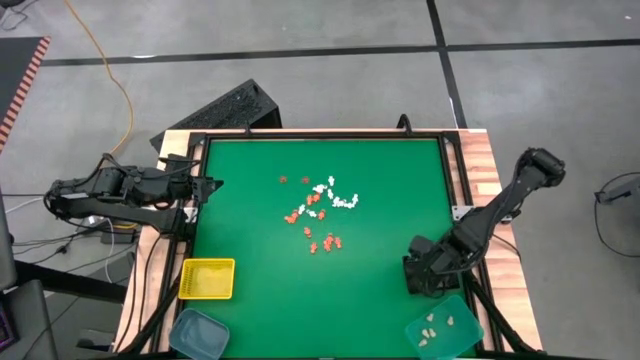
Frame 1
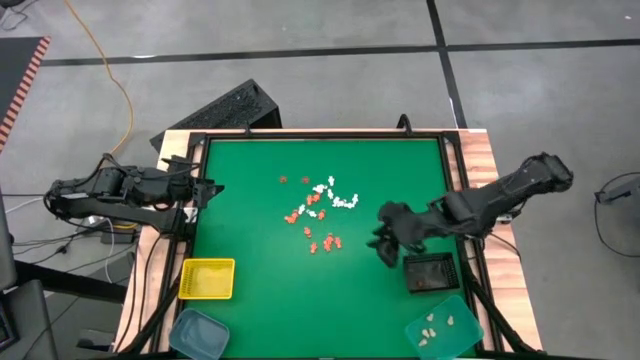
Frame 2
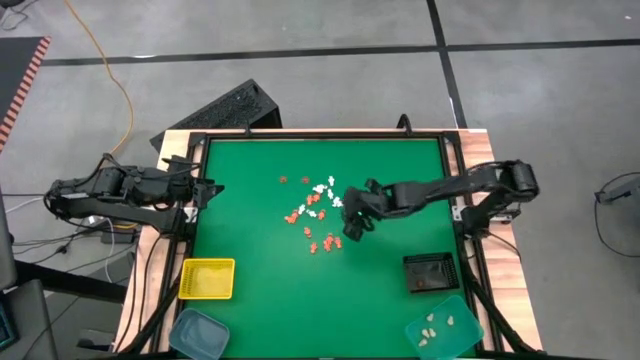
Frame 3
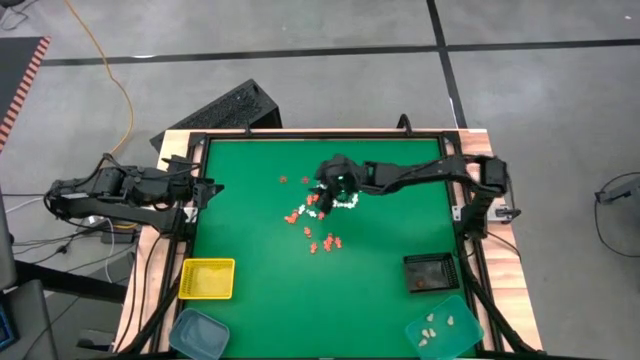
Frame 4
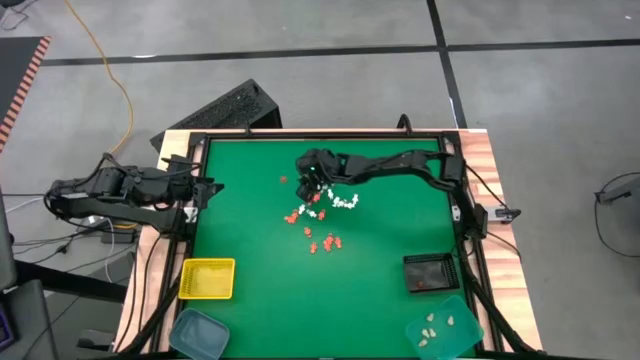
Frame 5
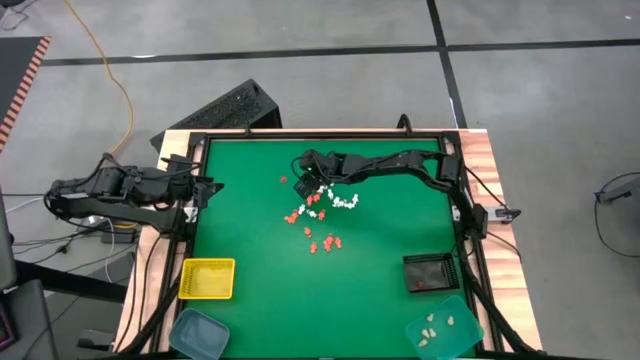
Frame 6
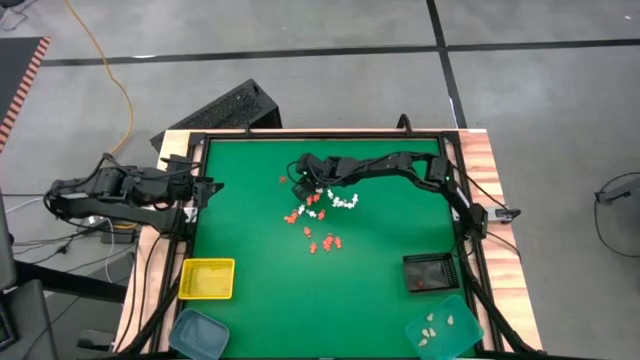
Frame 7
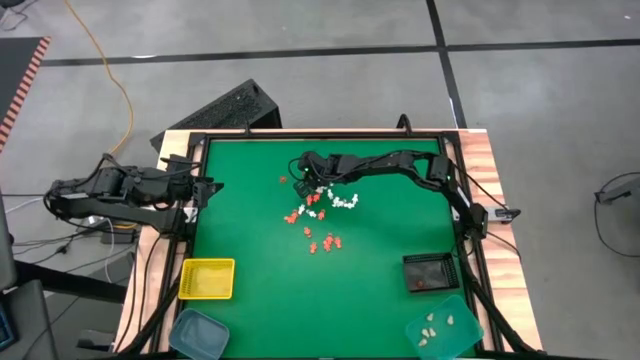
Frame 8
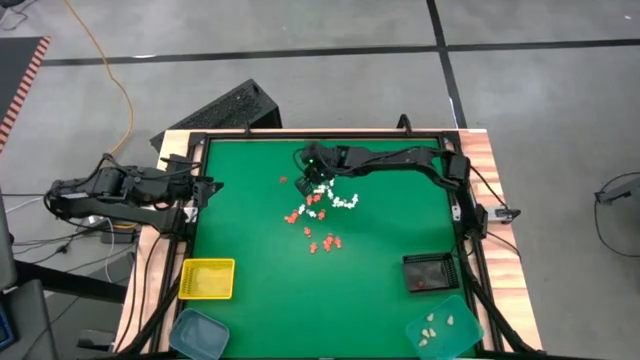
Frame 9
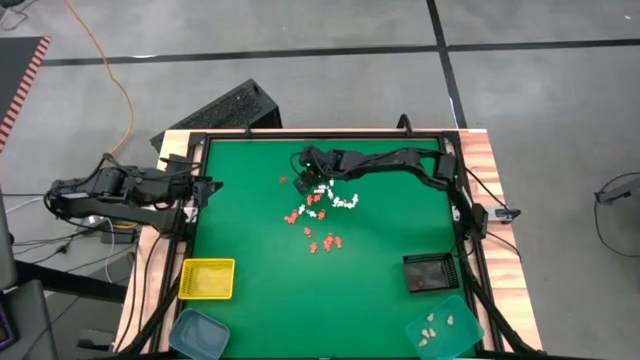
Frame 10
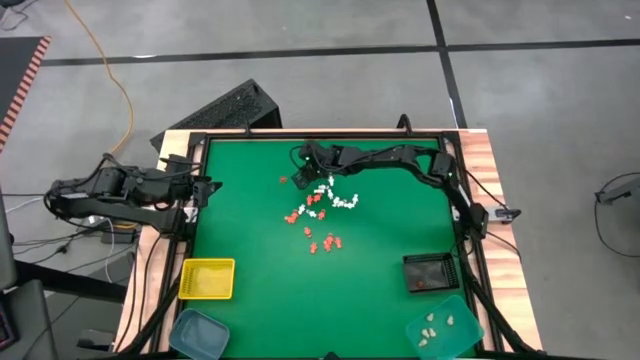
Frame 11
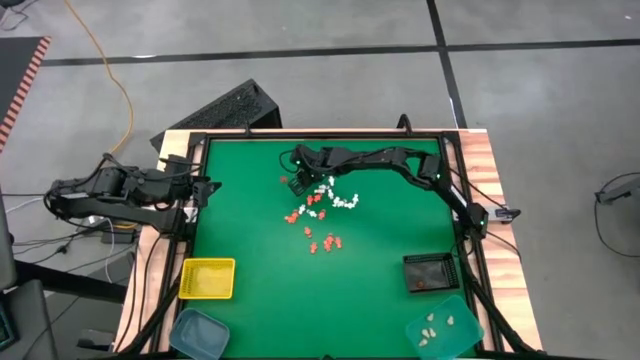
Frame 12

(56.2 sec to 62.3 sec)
Task: Sort Halloween decoration
Put the orange pumpkin toy into the black bin

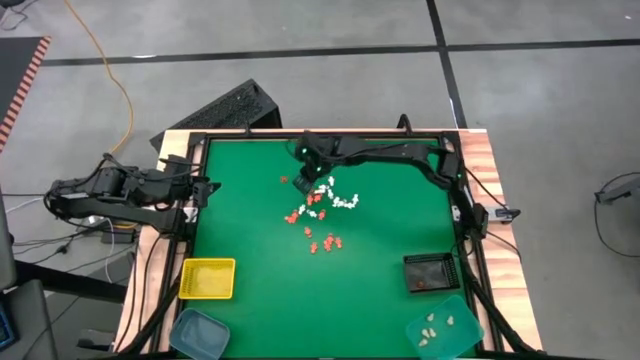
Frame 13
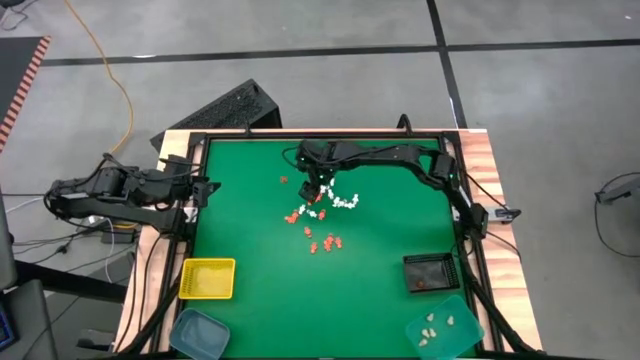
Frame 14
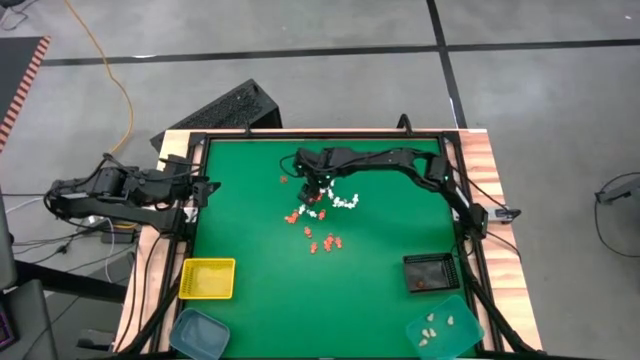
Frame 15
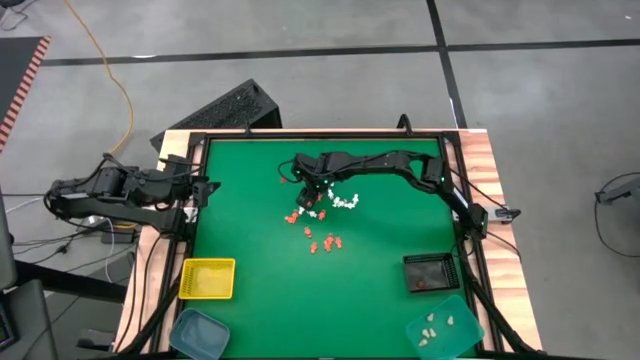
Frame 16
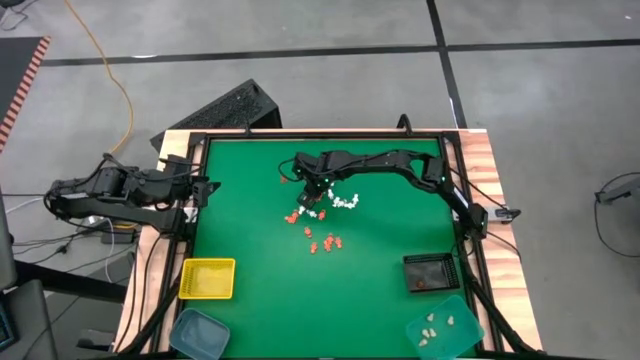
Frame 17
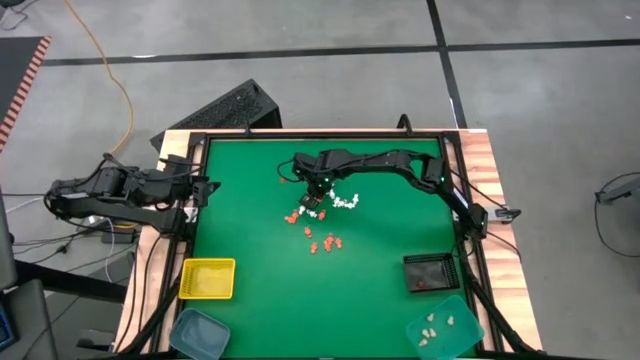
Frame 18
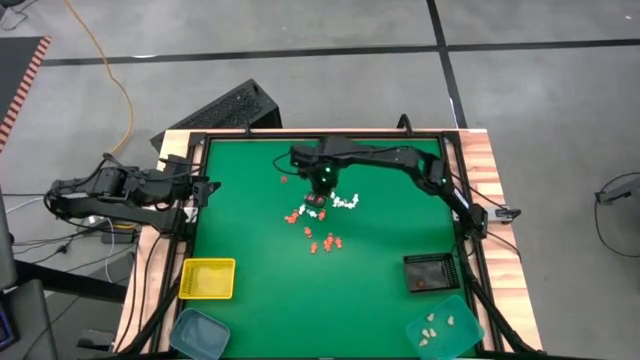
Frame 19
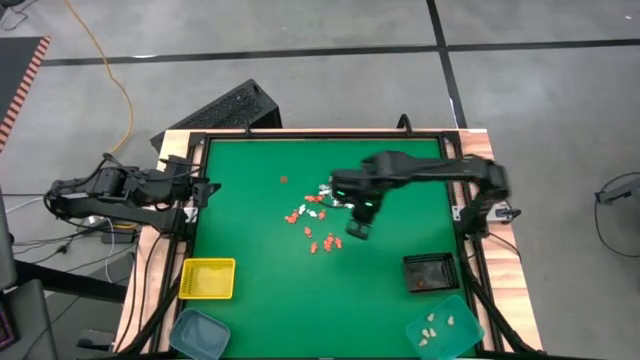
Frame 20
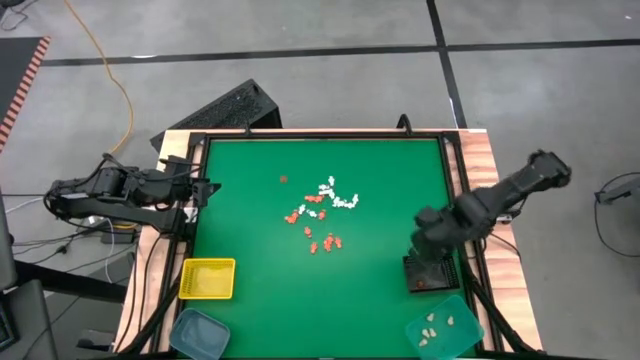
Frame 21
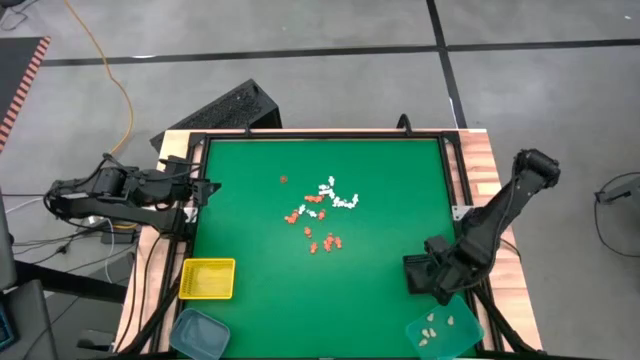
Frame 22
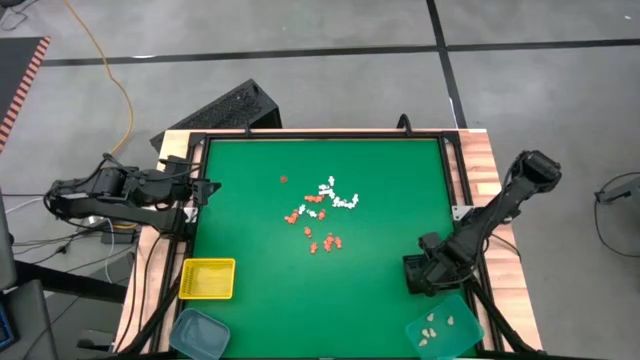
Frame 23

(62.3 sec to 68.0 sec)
Put the orange pumpkin toy into the black bin

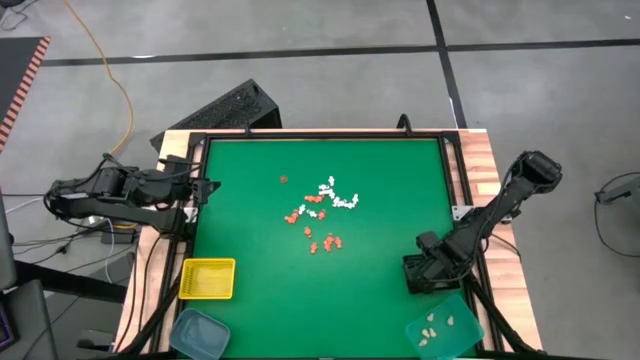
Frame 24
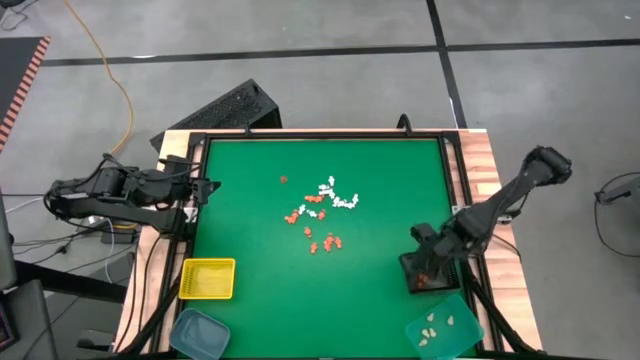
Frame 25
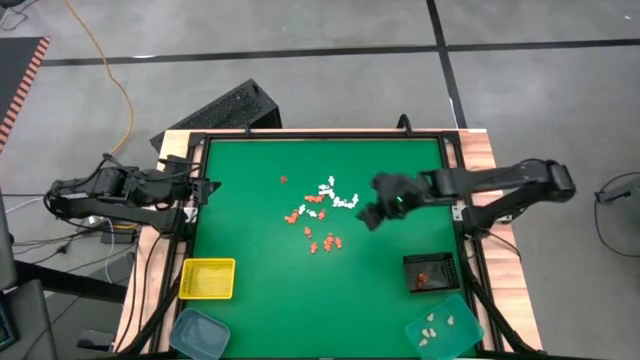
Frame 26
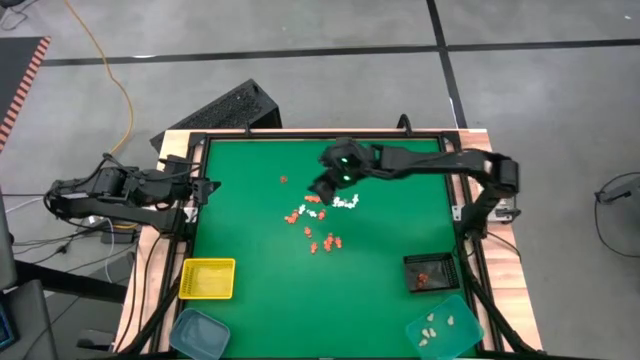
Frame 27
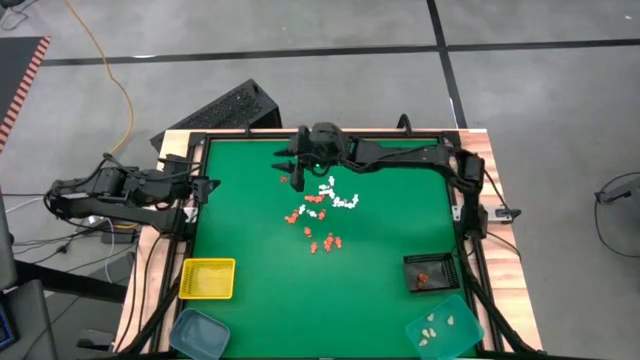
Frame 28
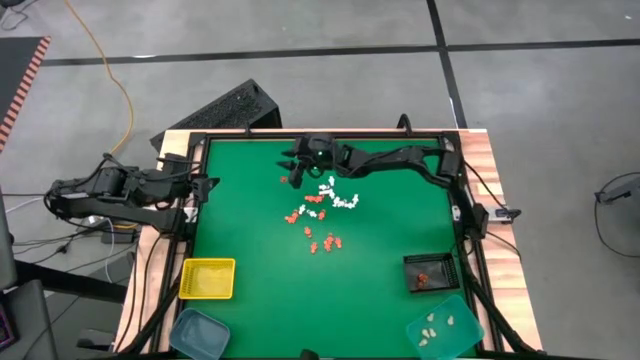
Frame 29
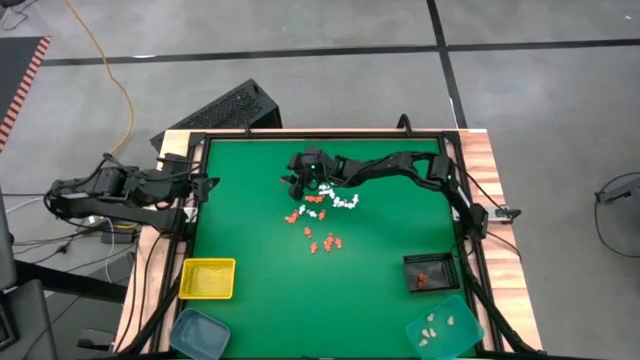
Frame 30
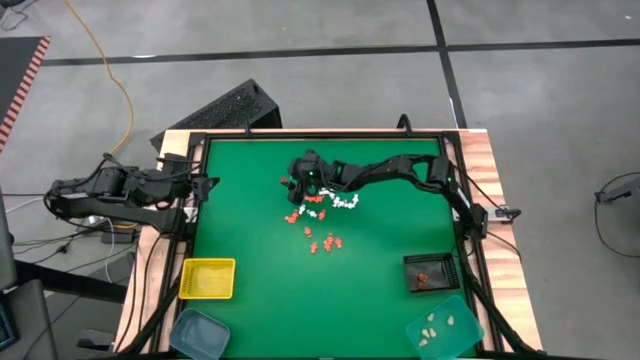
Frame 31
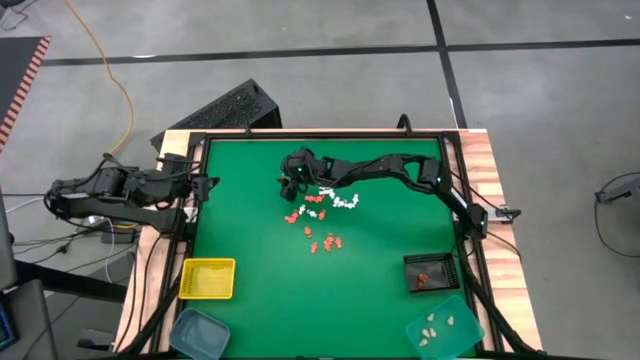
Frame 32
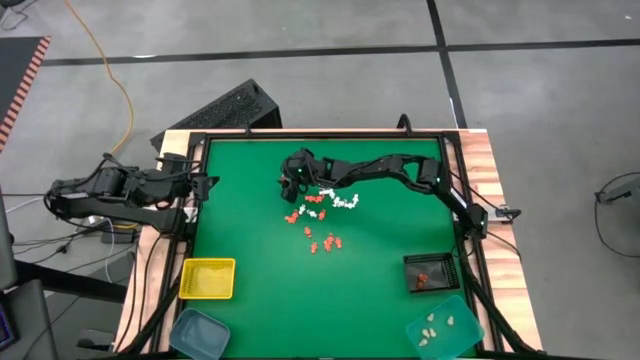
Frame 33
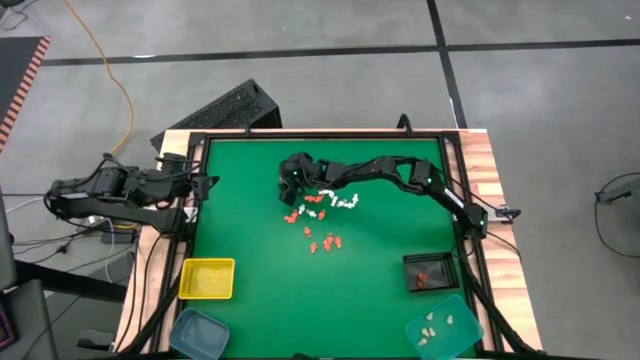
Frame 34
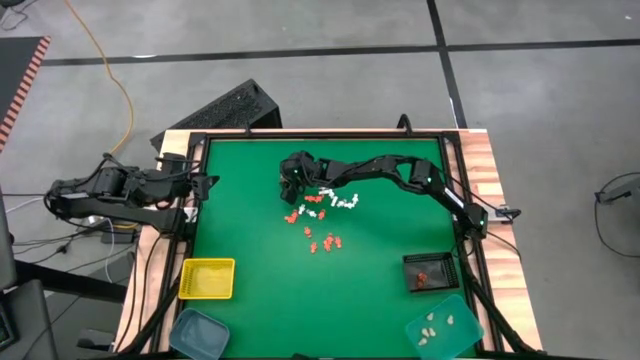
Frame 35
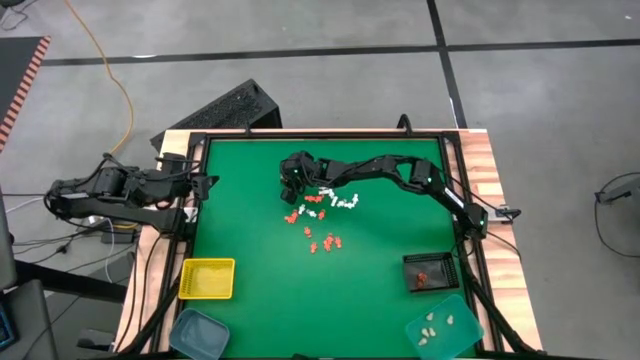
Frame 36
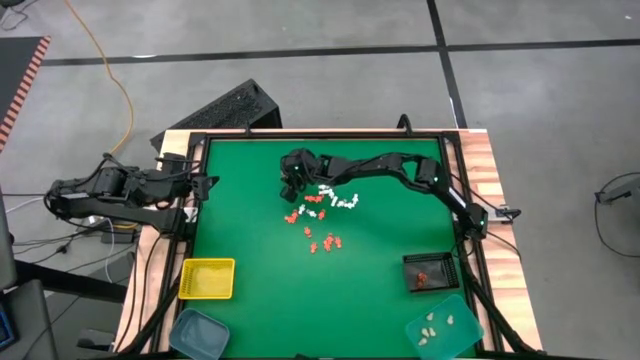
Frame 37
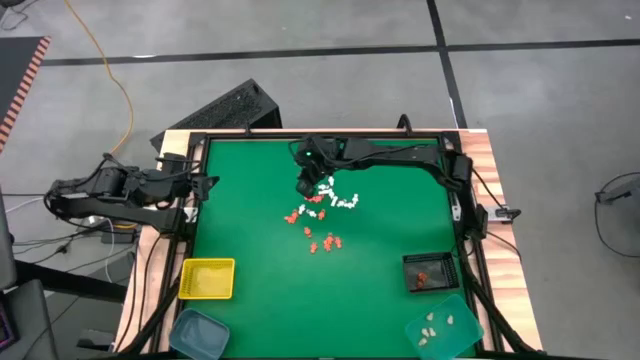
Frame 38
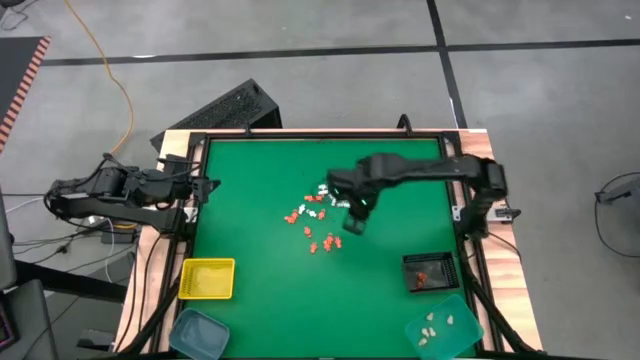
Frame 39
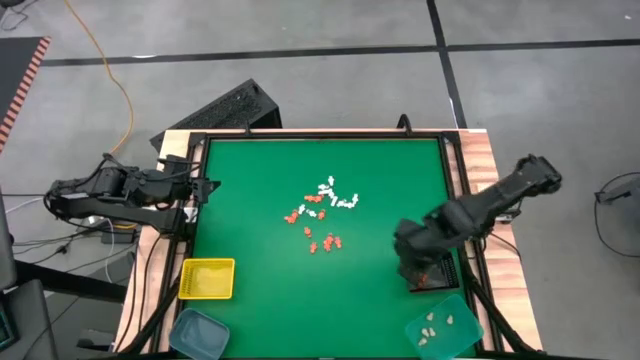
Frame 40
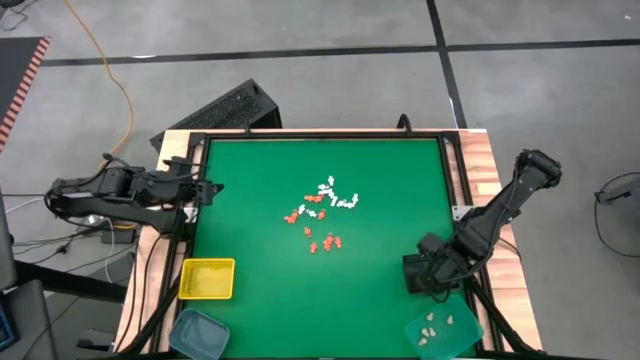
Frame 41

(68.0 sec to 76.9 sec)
Put the orange pumpkin toy into the black bin

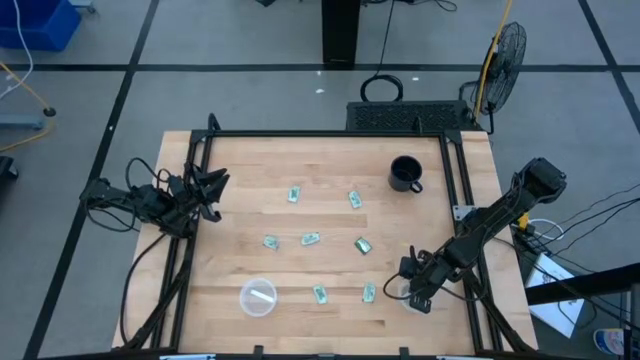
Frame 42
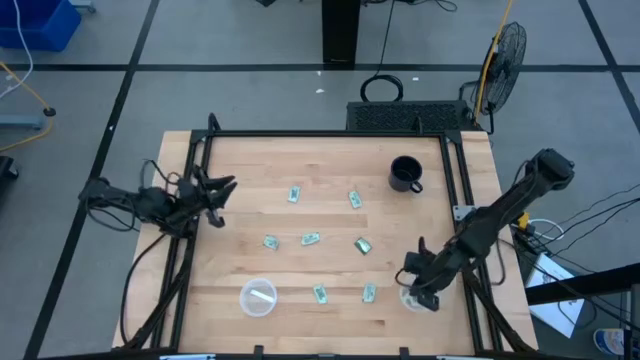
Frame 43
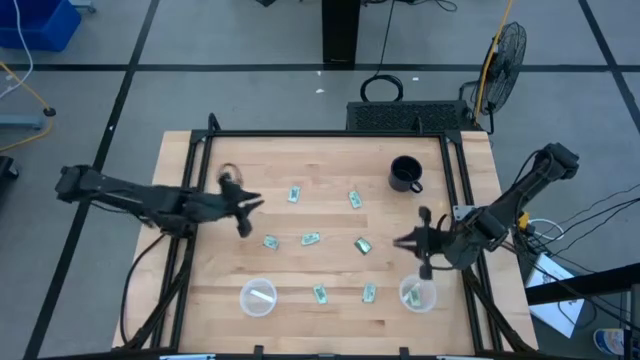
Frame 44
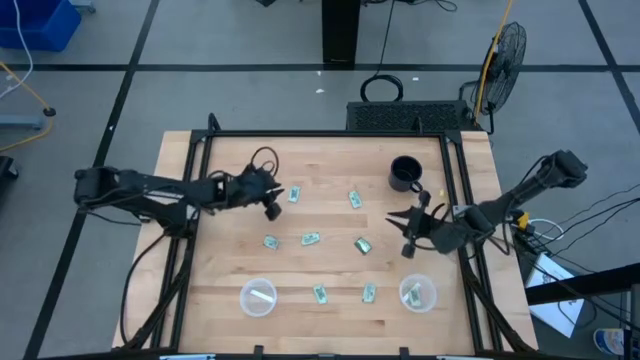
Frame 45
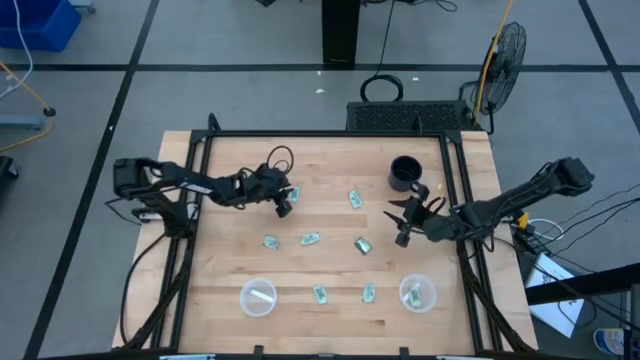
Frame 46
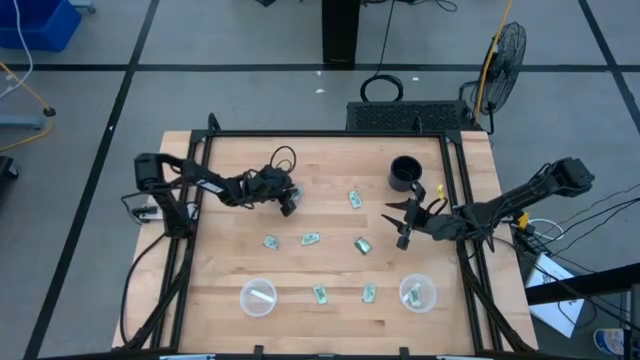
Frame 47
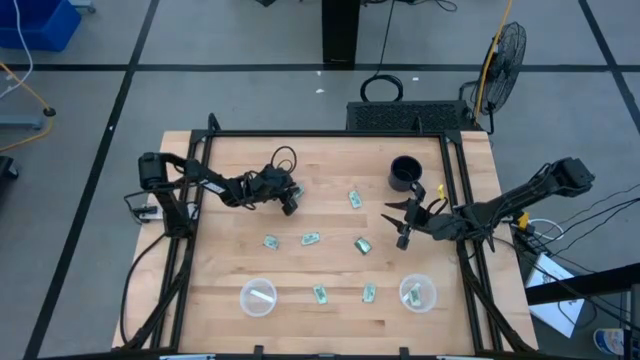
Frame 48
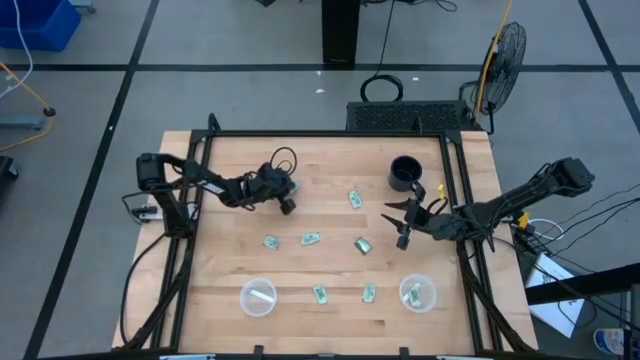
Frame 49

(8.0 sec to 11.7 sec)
Task: Pick and place Stevia / Truvia into bins
Put the stevia packet into the left transparent container
